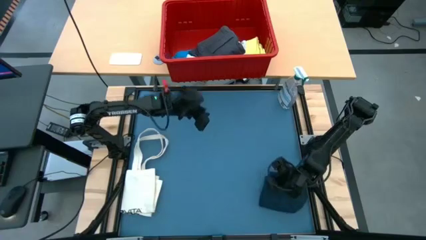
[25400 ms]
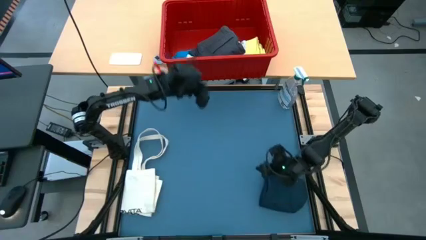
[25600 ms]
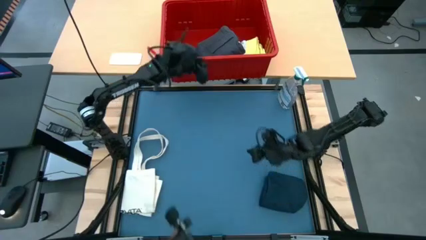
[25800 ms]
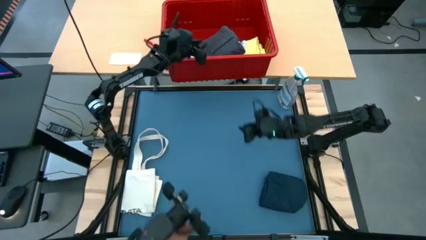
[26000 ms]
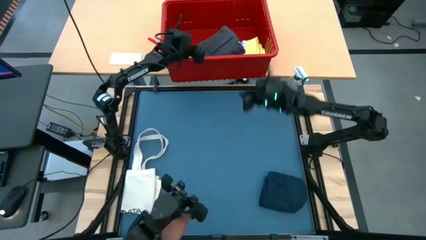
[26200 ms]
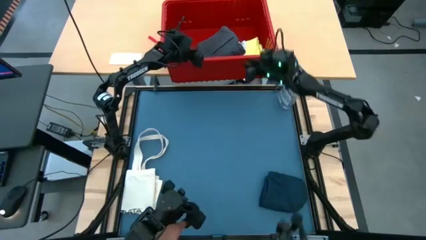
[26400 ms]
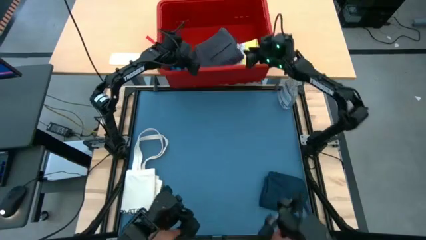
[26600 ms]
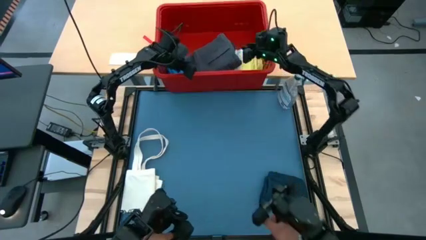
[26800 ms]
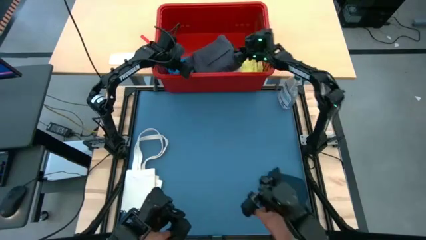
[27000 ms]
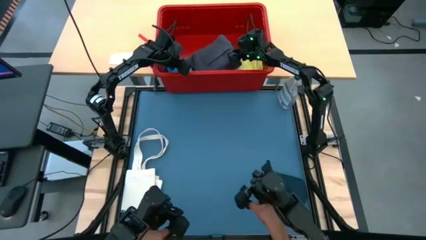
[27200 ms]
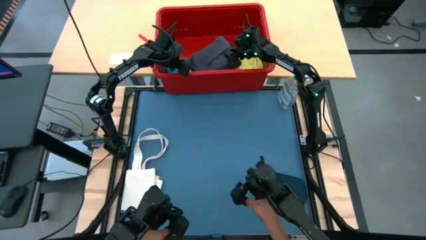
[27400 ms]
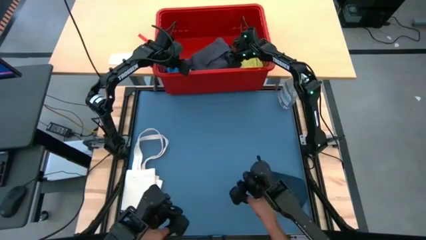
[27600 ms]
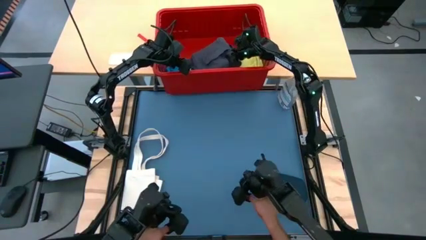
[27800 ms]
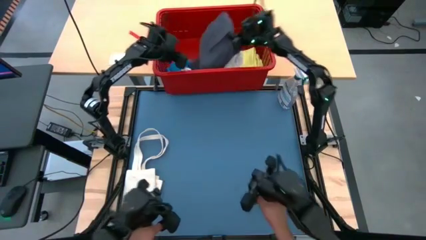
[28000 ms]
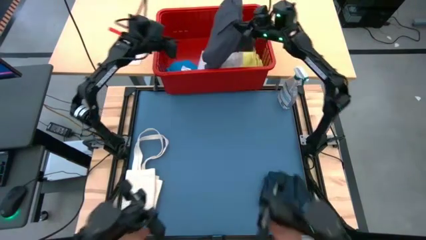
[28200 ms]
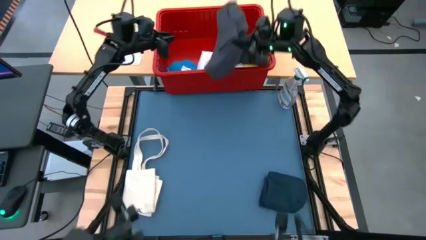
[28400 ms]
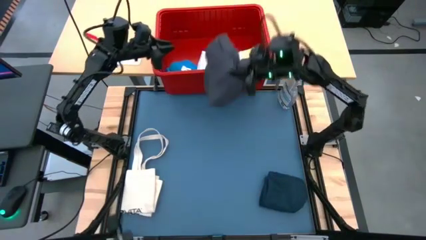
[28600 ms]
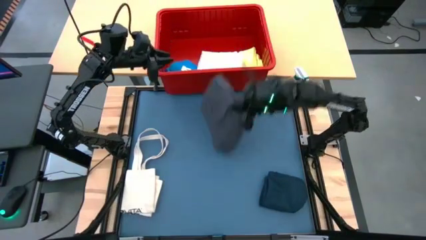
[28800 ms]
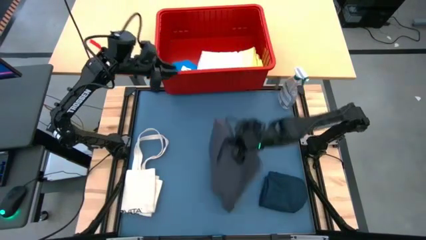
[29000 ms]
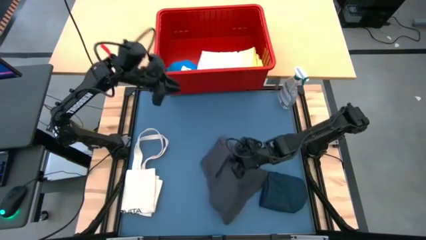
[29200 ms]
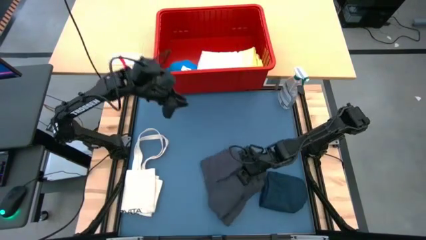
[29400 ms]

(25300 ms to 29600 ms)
Task: Fold Laundry from Bin
Remove the gray shorts from the bin

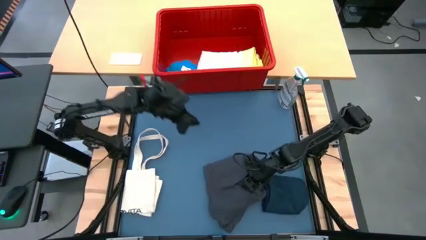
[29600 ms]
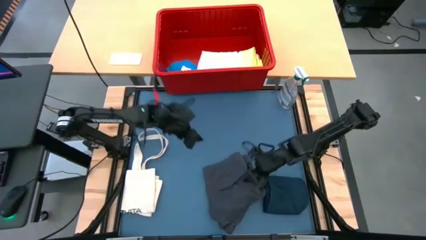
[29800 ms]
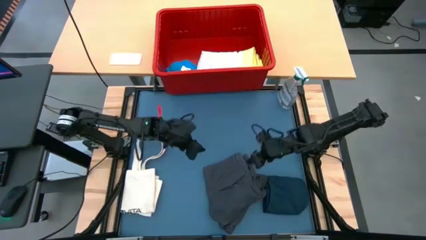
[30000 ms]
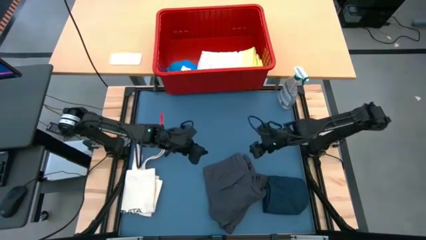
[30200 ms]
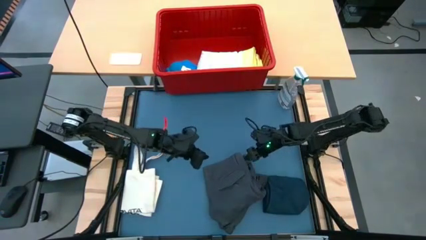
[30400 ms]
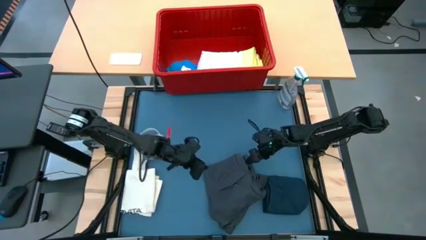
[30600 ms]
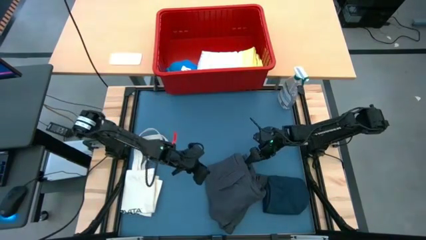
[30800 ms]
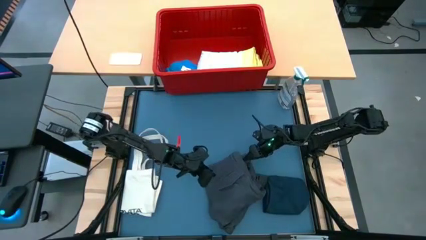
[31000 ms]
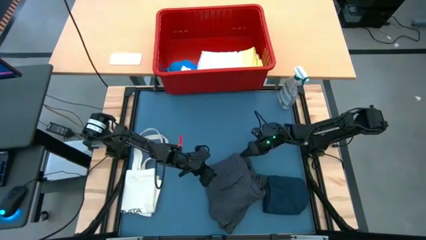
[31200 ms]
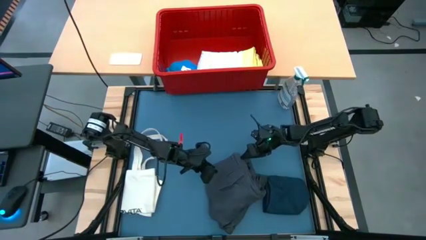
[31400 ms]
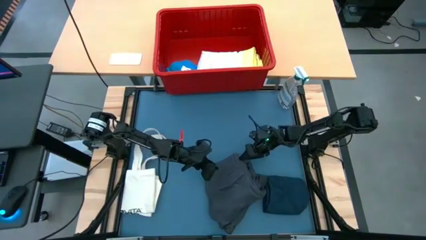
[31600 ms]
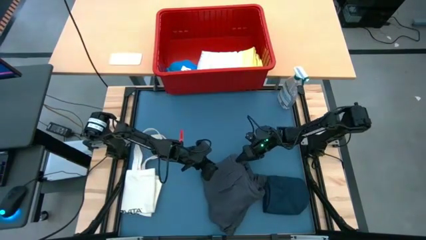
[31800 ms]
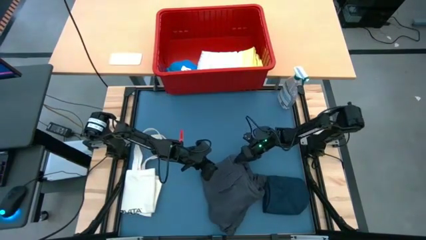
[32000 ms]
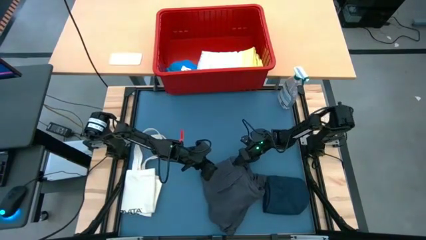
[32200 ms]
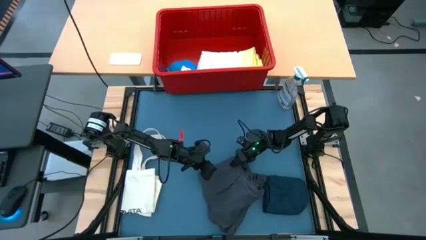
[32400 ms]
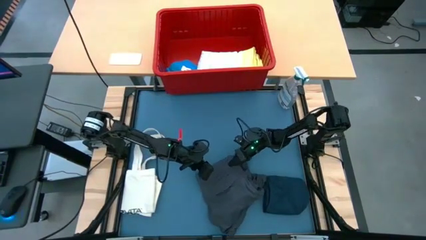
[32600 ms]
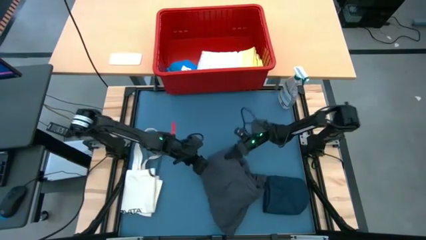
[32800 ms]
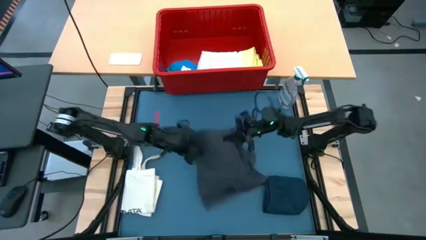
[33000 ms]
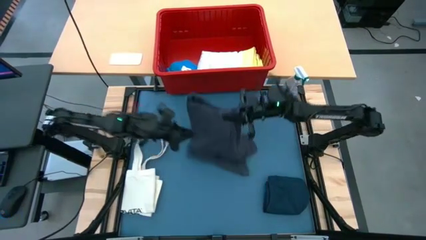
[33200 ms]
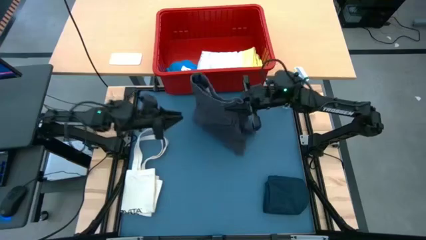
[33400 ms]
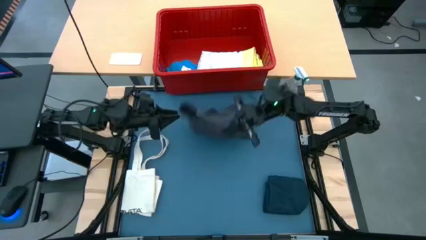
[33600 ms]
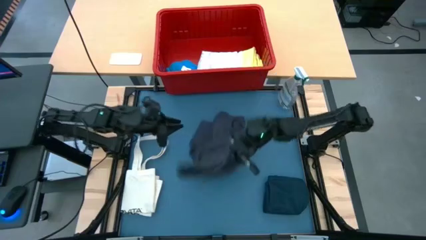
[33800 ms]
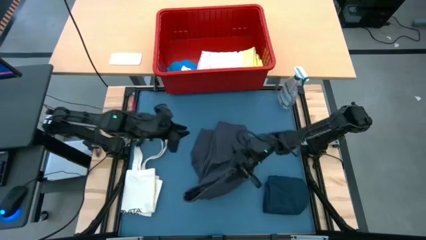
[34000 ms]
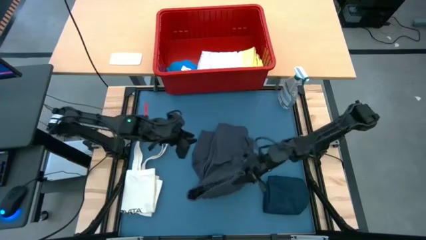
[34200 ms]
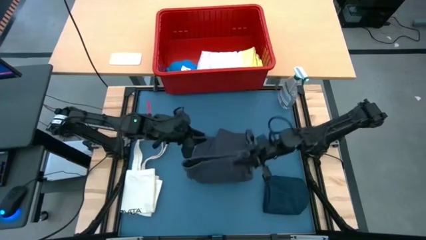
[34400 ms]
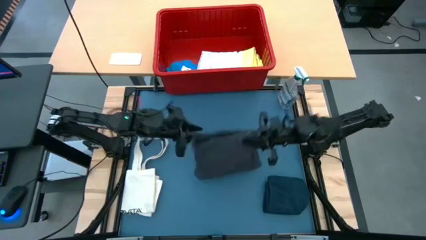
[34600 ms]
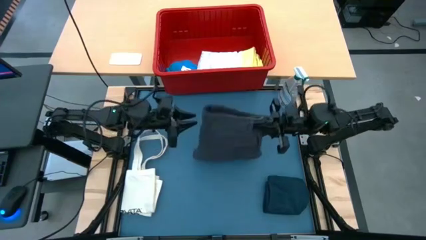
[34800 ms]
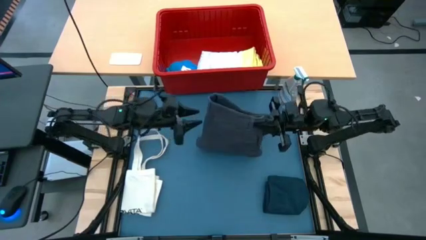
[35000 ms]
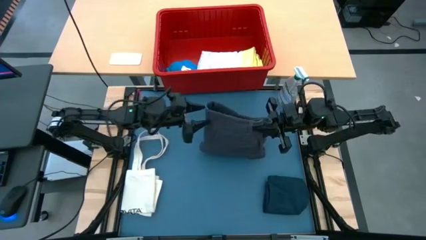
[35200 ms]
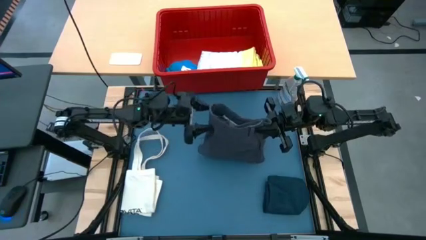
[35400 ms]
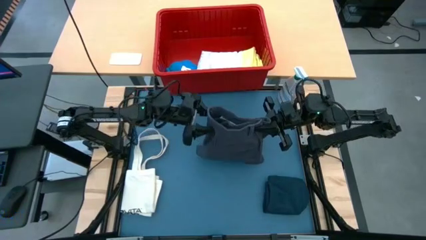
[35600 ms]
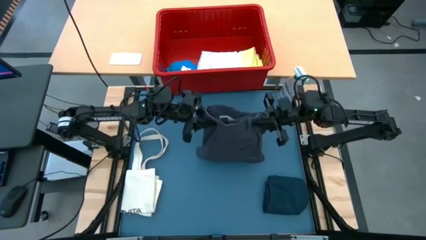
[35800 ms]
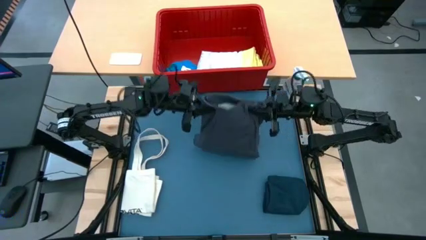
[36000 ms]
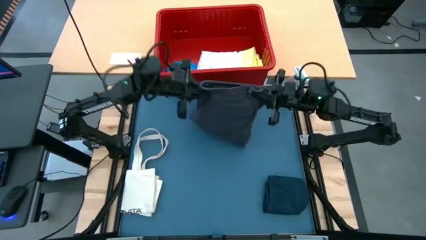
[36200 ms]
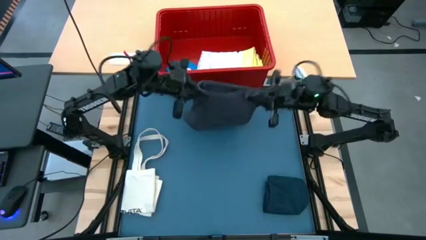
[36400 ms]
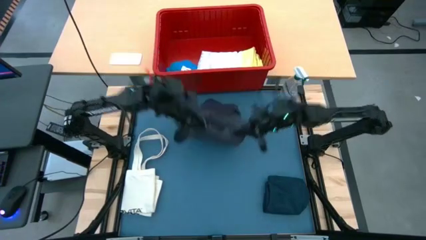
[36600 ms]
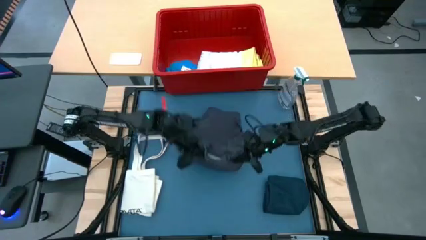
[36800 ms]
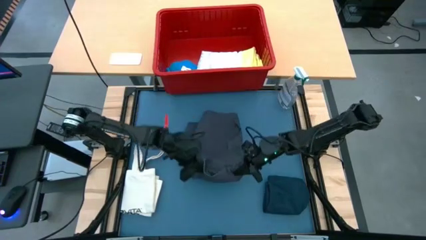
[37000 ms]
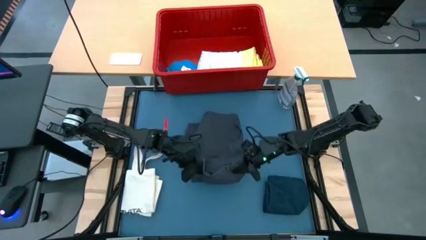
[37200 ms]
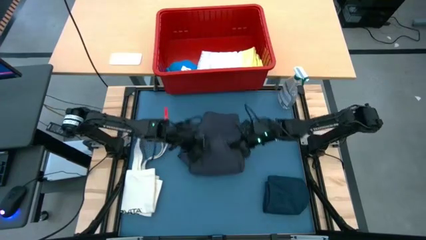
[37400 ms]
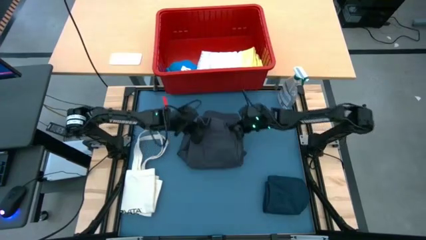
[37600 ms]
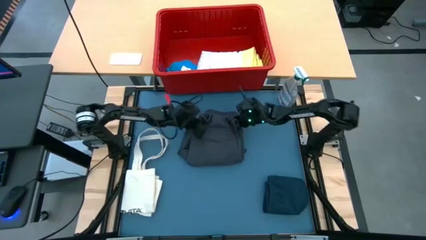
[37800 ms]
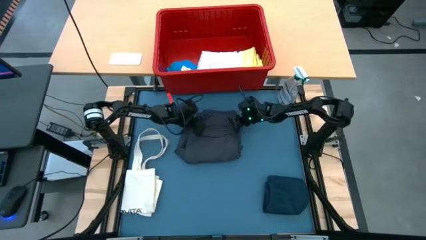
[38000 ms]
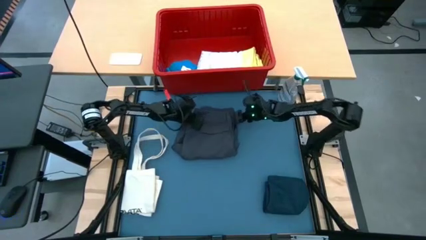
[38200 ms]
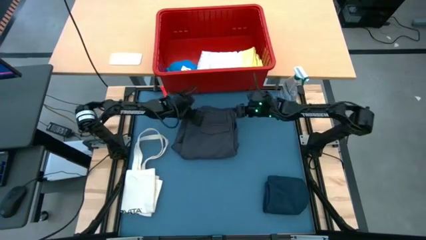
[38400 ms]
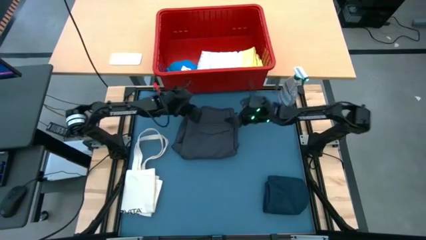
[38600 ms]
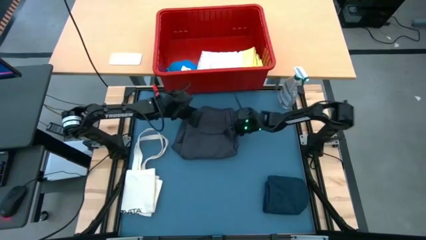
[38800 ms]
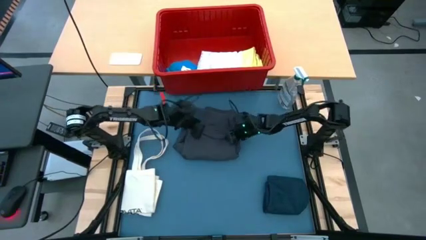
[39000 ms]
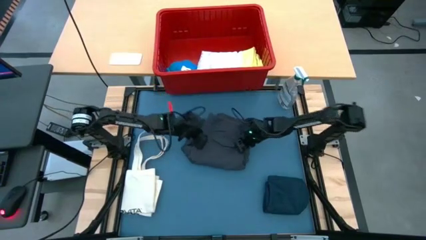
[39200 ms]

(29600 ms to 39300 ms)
Fold the gray blue shorts

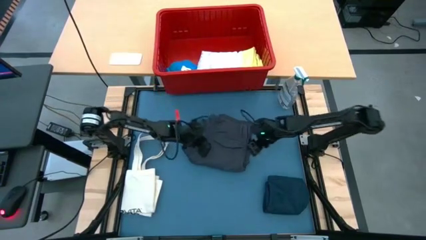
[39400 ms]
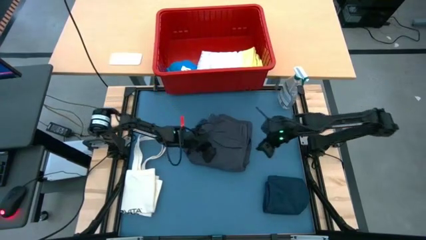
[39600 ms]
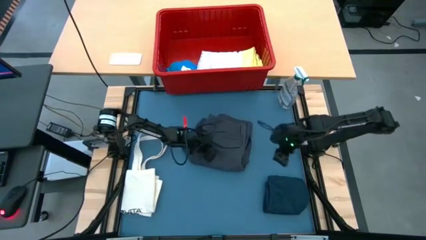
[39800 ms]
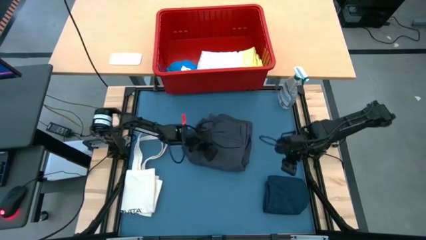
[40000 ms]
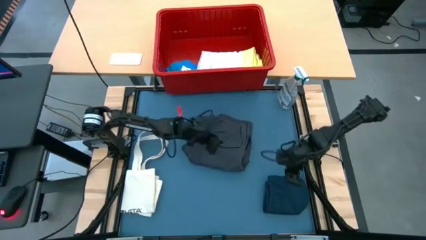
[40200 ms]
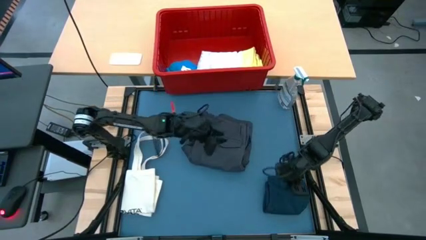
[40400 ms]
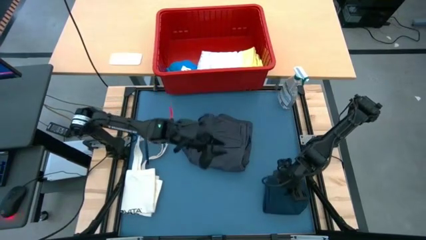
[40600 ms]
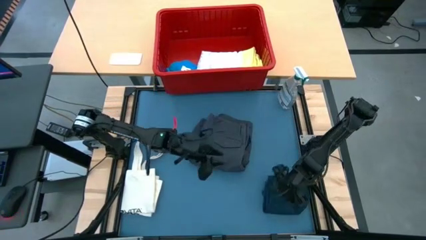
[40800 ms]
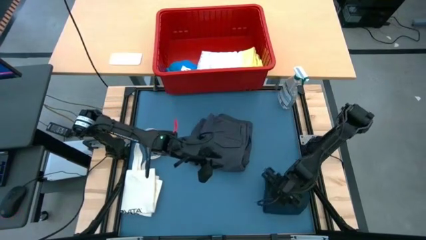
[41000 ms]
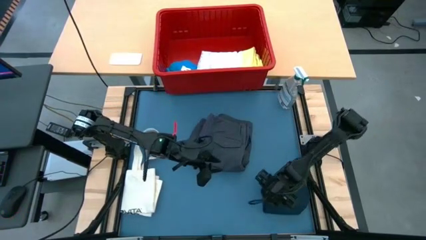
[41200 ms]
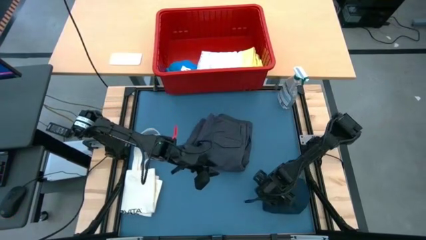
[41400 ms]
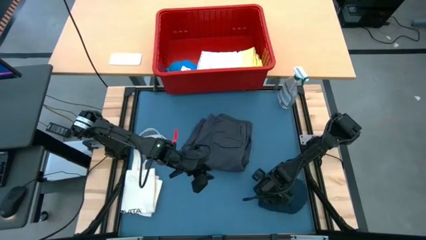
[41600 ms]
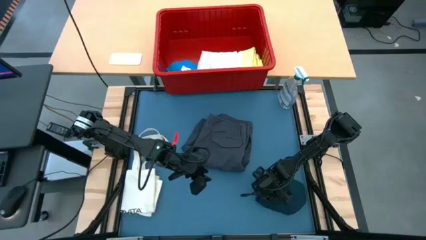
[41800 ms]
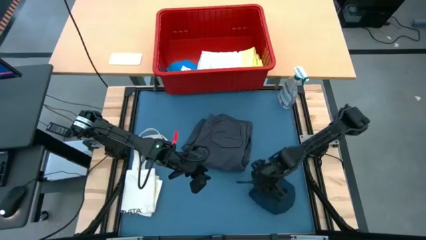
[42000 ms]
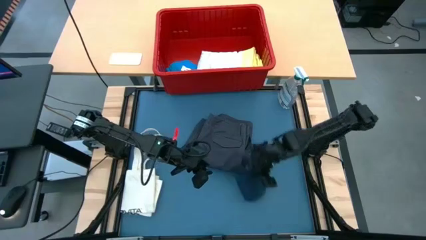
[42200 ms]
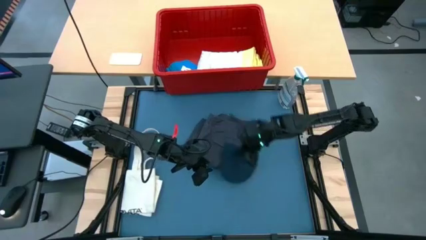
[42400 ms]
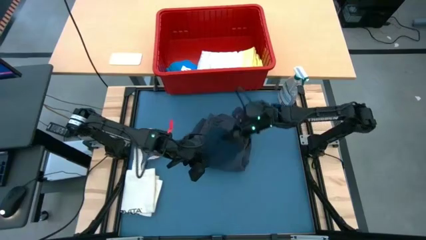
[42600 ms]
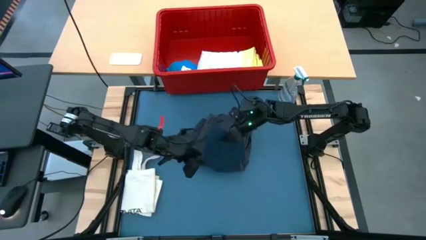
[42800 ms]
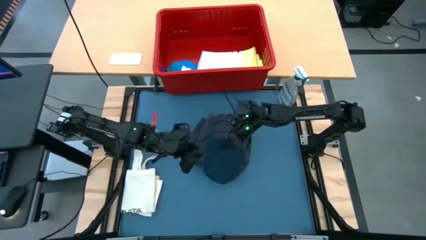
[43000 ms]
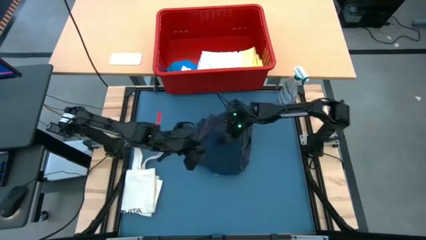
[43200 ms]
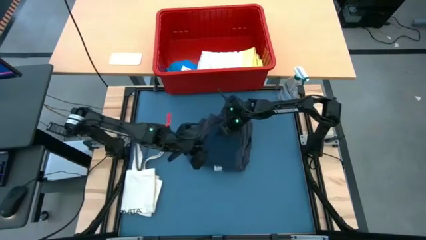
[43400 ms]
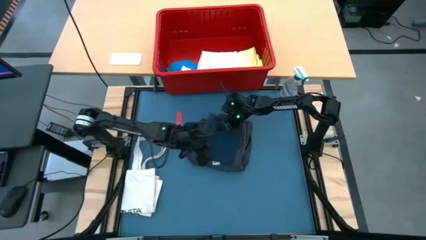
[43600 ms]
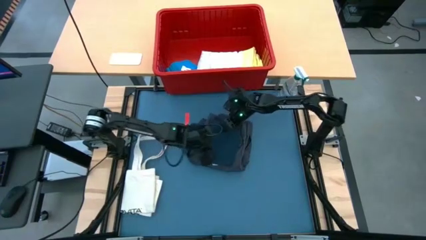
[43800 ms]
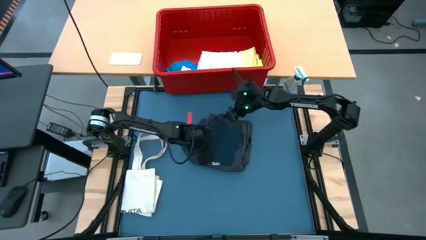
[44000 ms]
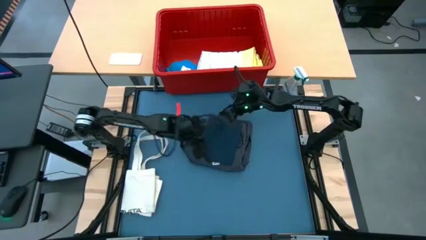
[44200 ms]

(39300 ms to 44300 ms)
Stack the folded dark blue shorts on the folded gray shorts
